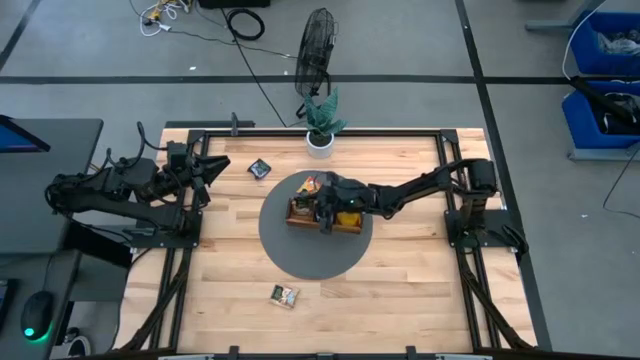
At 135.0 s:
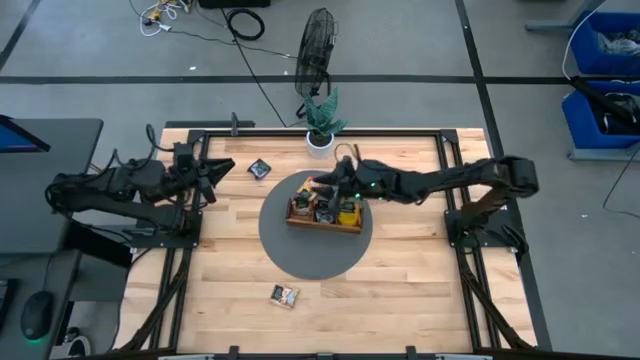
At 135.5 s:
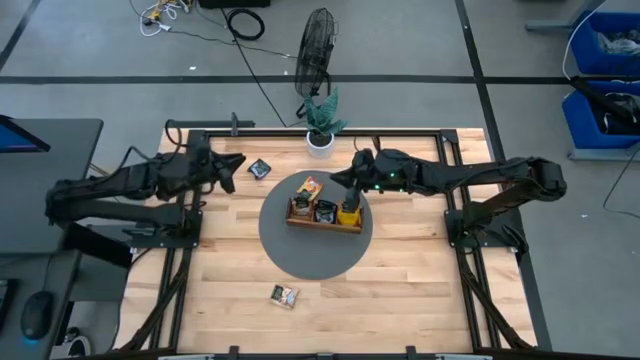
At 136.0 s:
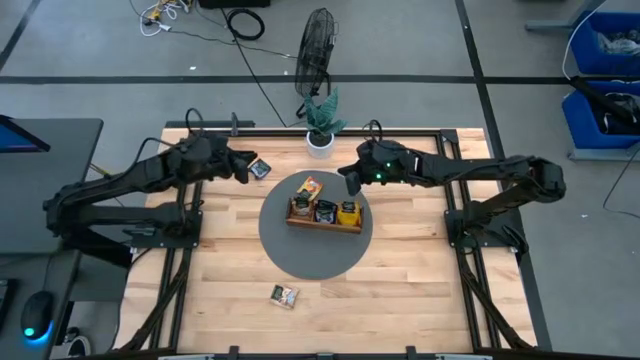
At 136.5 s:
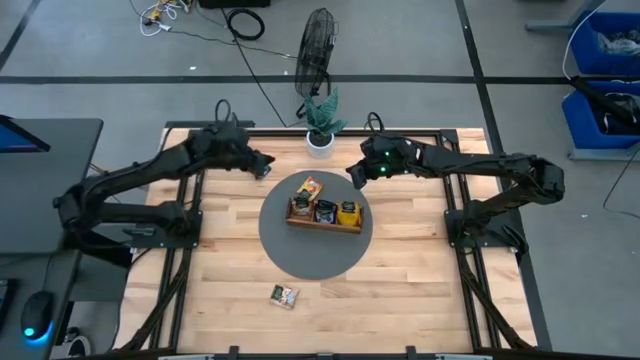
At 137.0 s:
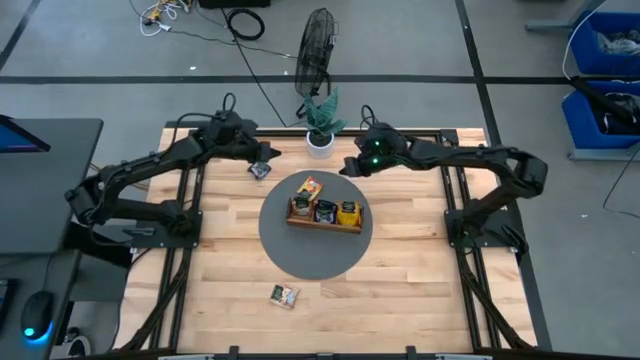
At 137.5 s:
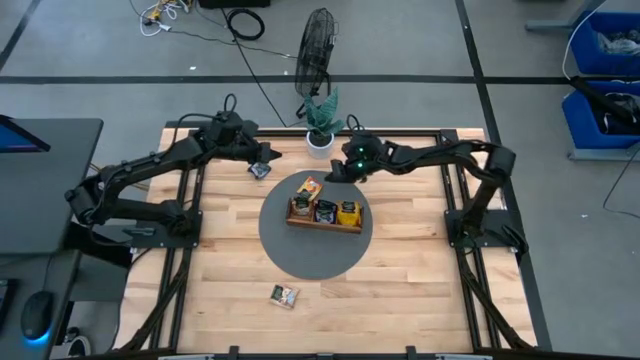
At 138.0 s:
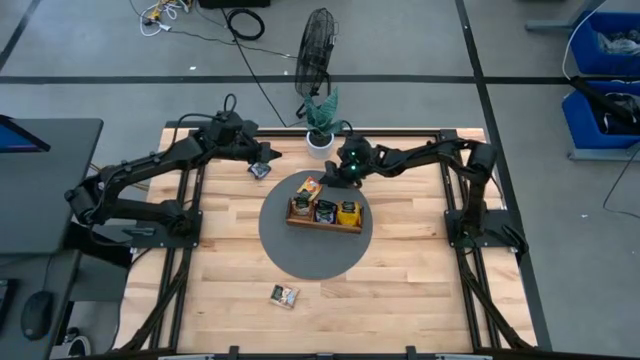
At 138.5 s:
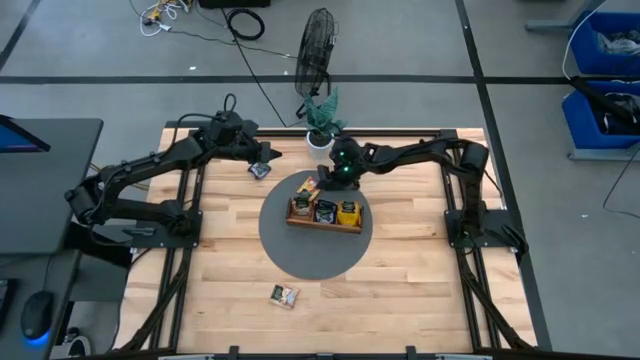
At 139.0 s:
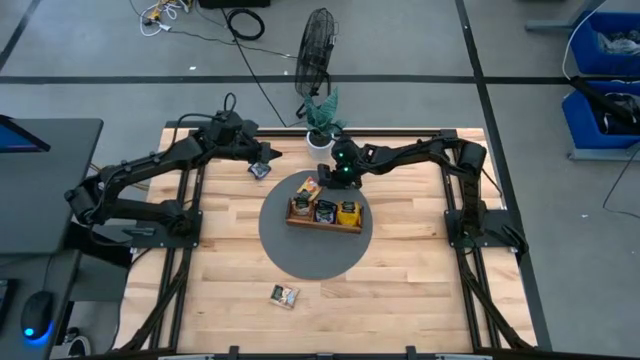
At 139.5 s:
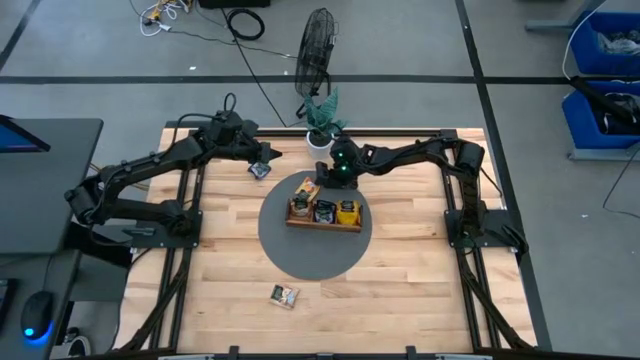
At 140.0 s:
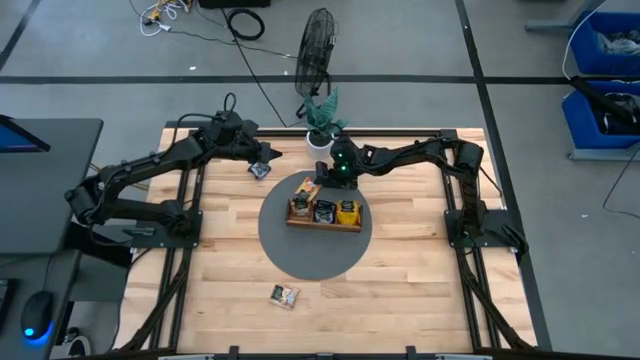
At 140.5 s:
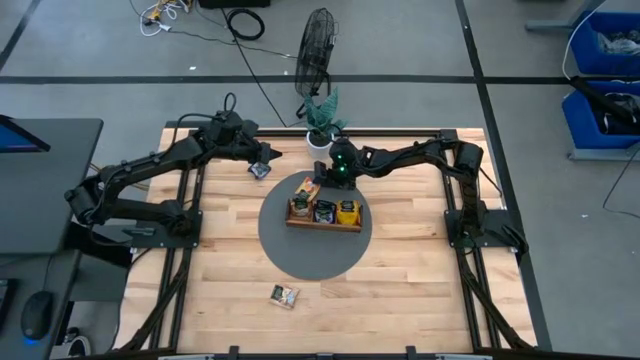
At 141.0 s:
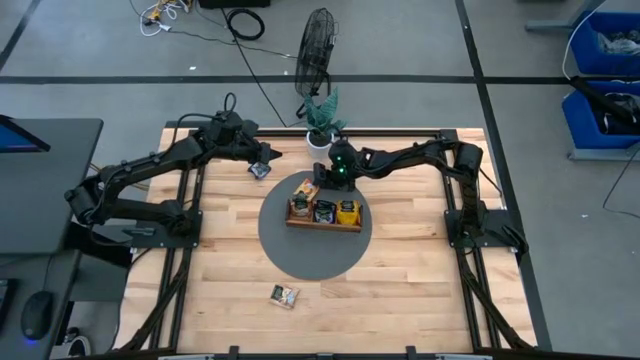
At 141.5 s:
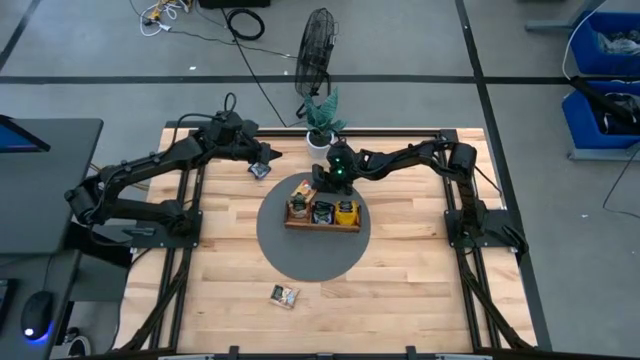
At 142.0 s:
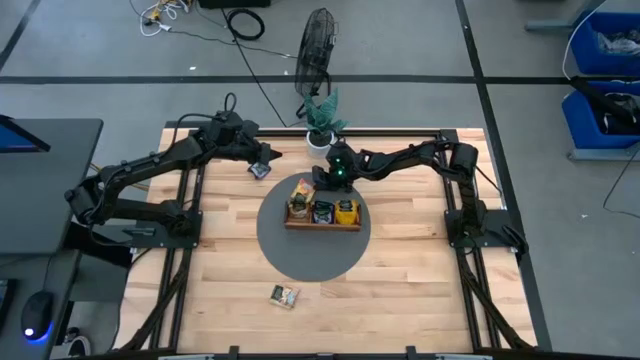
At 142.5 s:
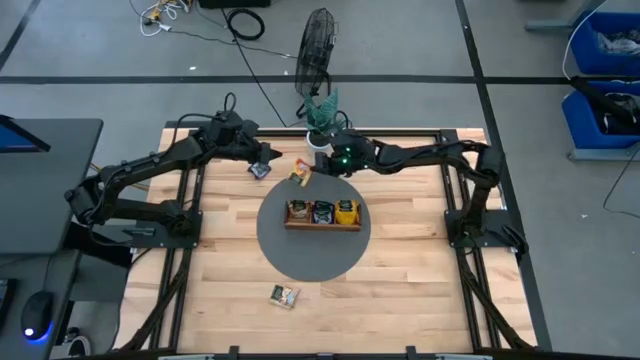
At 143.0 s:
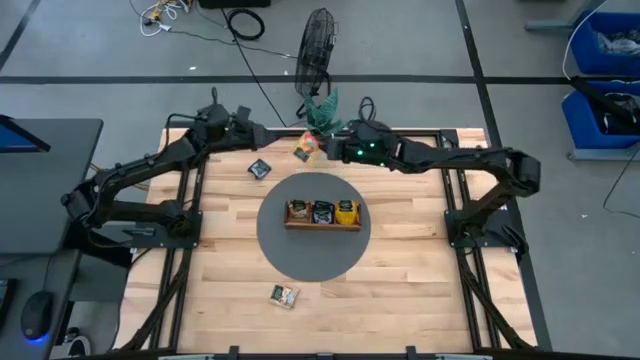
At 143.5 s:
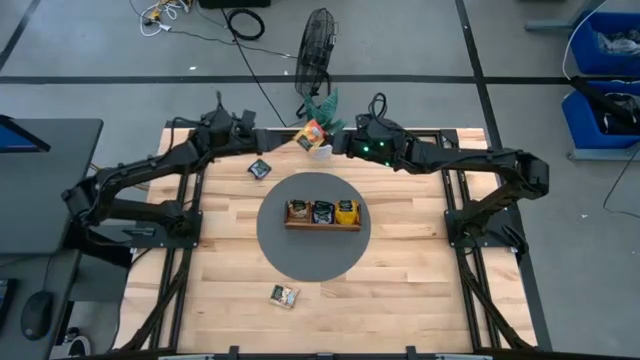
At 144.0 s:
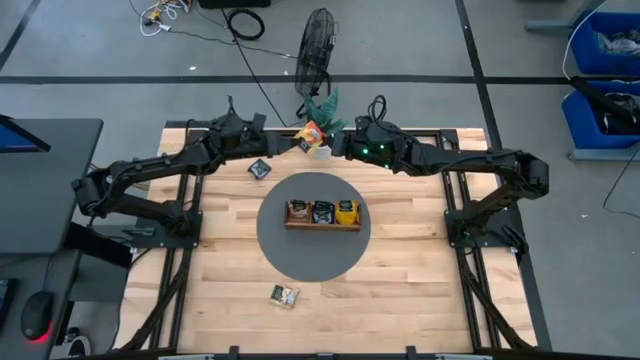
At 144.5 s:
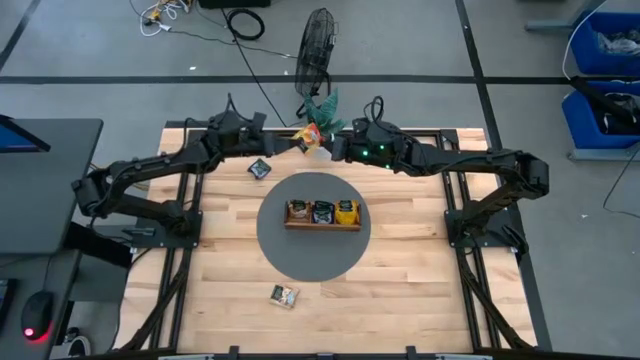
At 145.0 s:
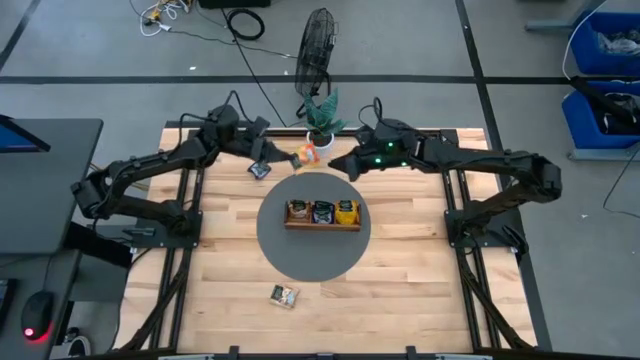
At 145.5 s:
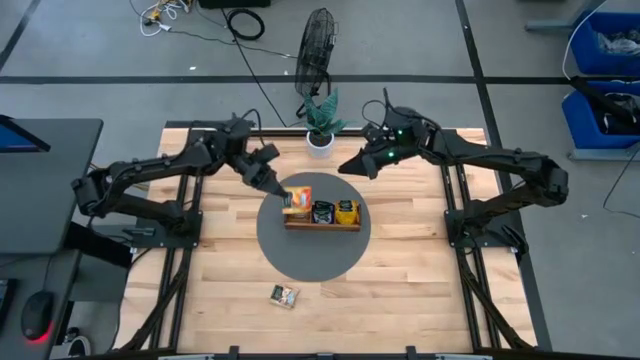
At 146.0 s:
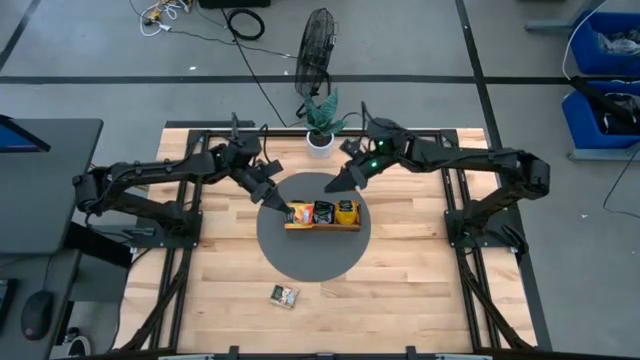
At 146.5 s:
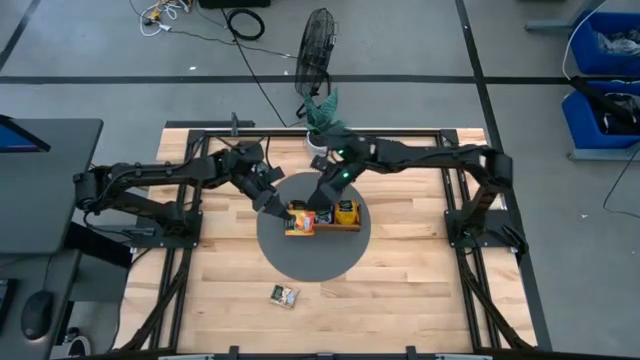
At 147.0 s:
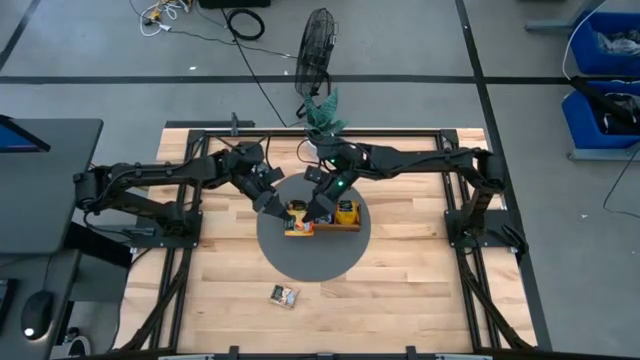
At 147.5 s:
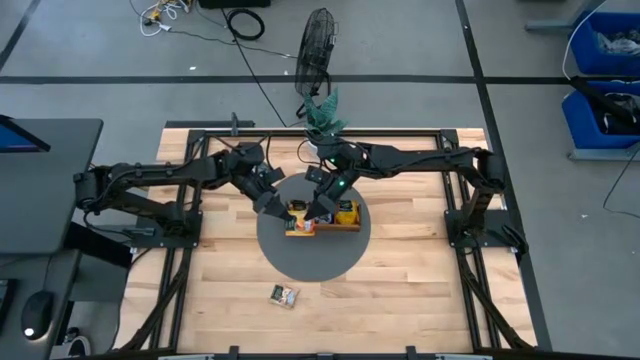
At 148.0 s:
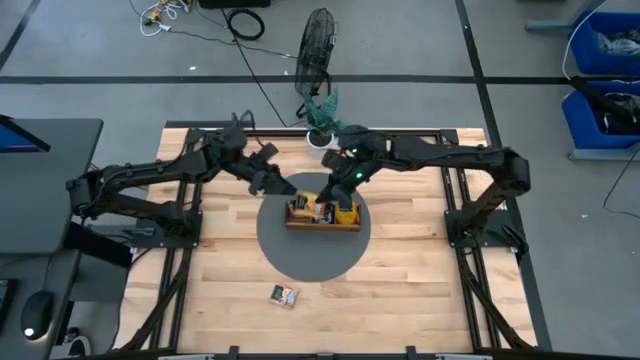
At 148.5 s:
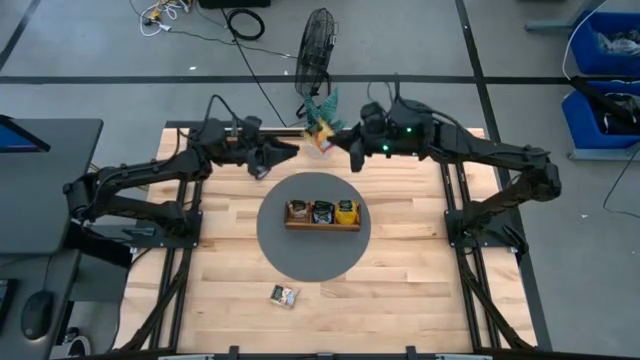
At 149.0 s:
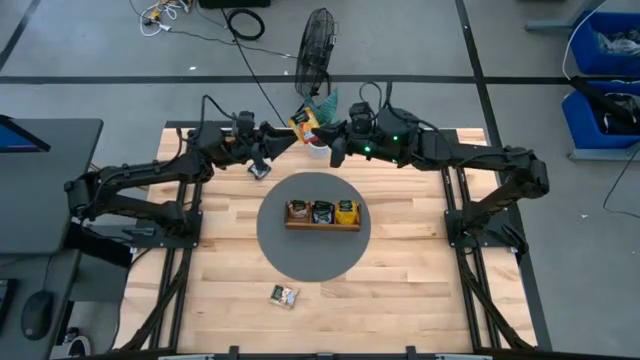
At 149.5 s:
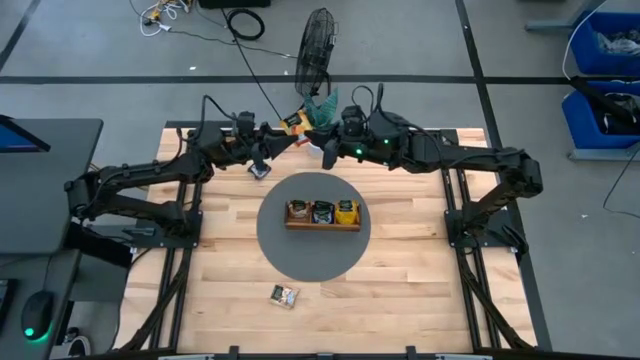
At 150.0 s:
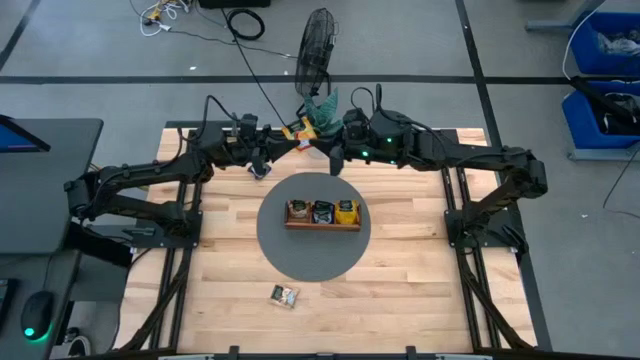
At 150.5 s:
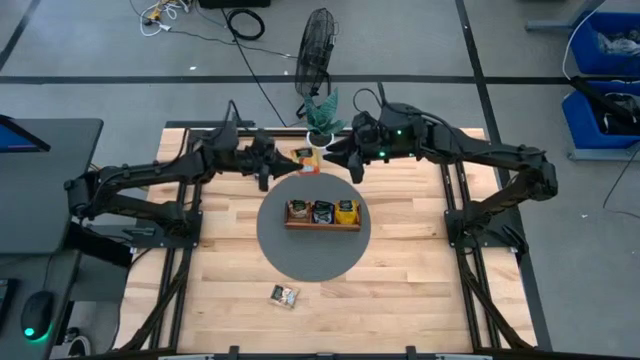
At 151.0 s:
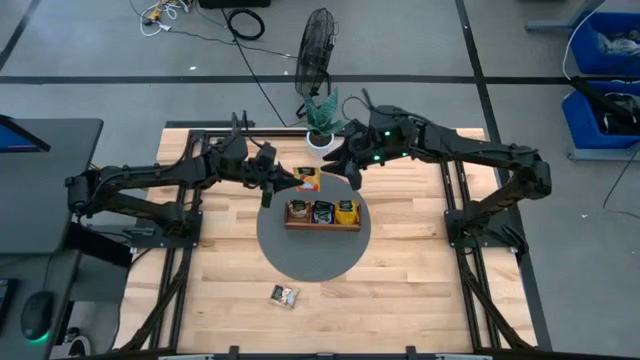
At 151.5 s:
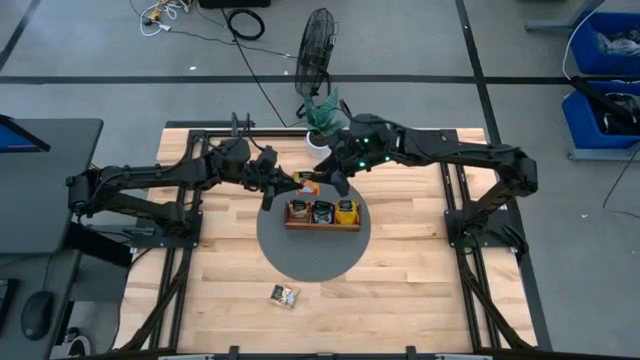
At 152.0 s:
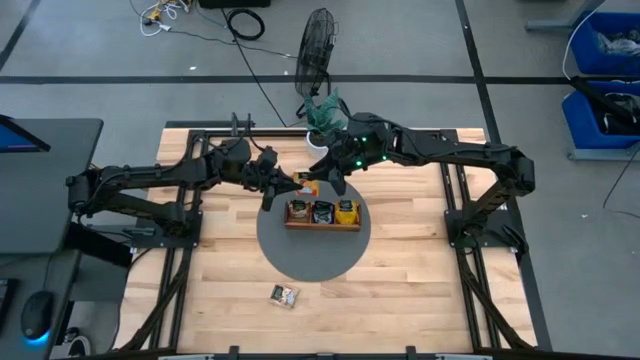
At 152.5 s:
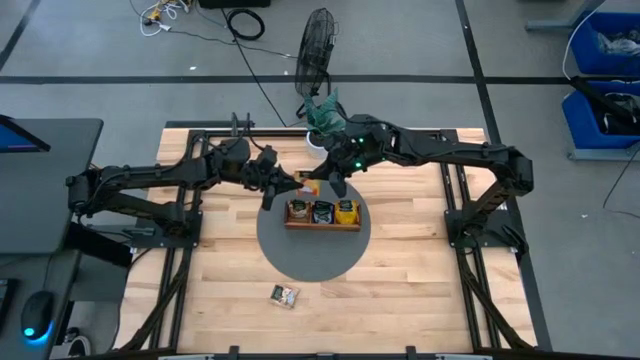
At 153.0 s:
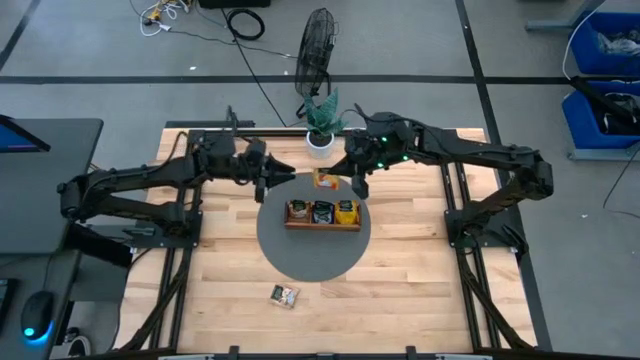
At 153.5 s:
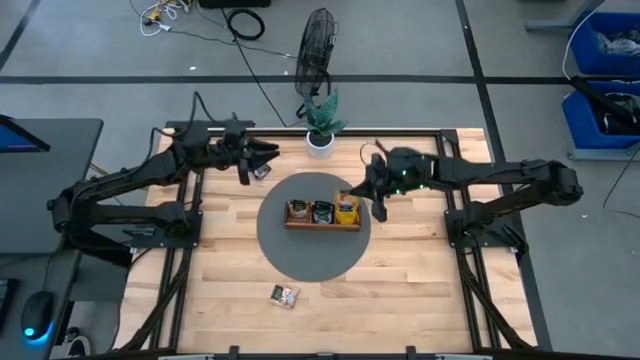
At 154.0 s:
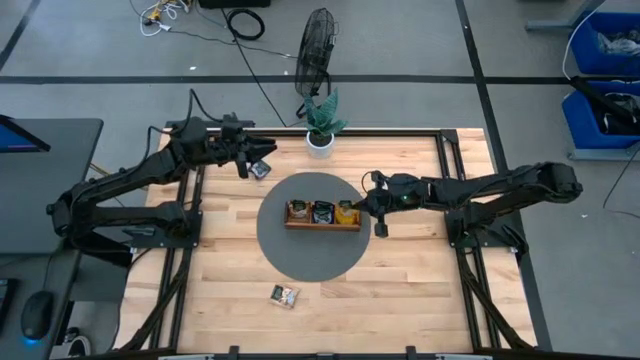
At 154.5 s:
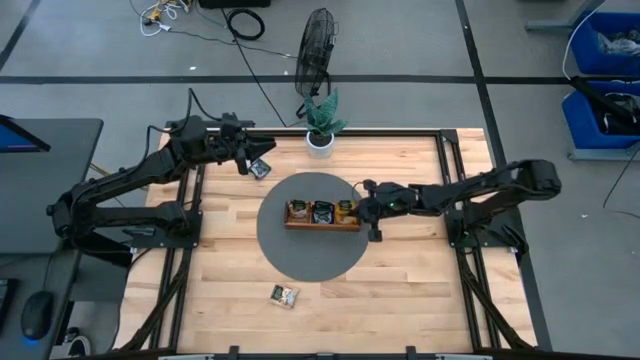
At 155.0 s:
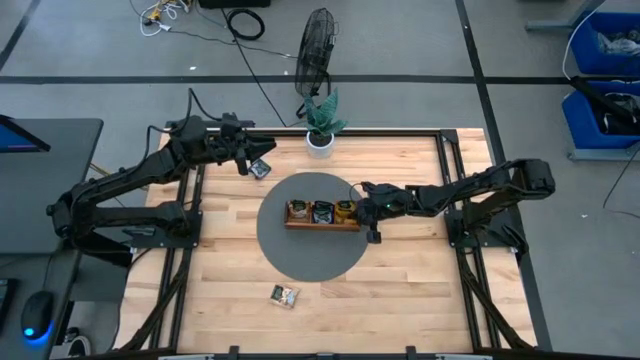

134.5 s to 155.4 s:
Task: Pick & Place Tea
Put the yellow tea bag into the right section of the wooden organizer
